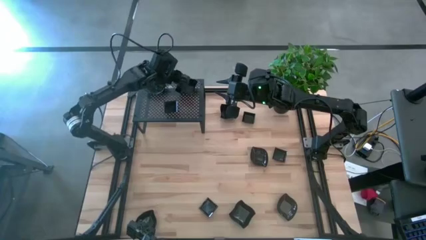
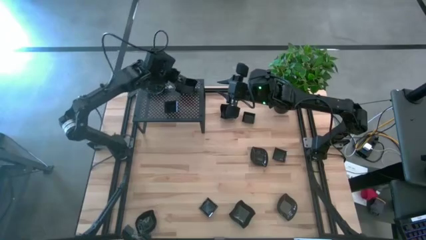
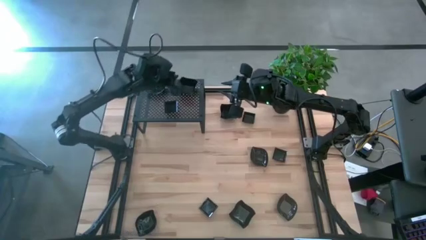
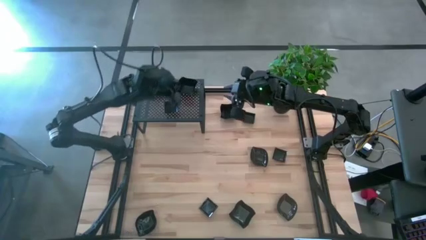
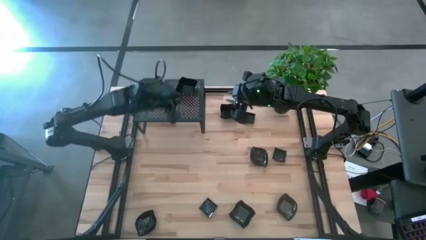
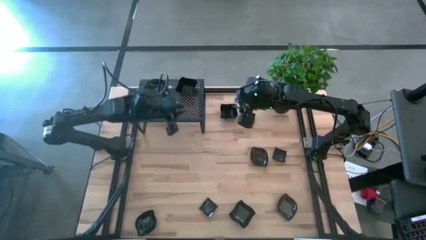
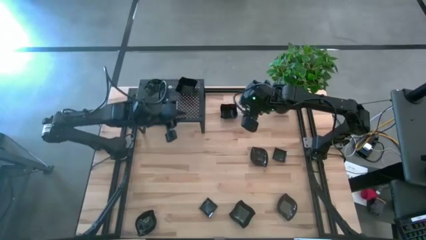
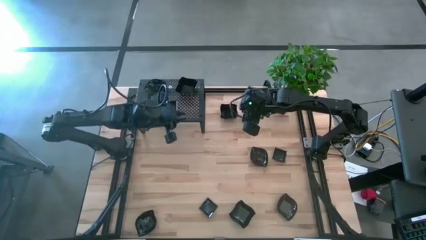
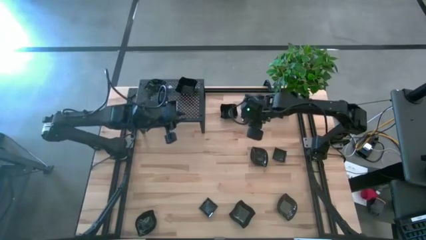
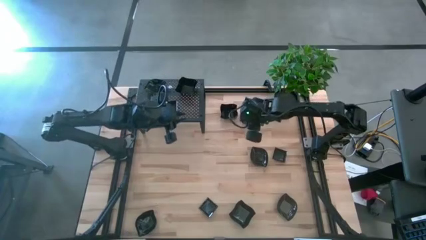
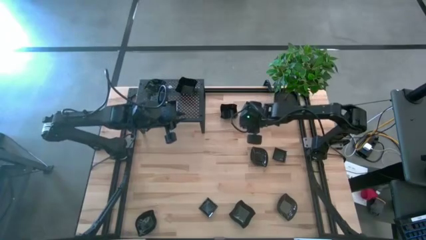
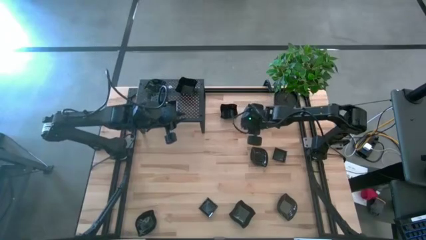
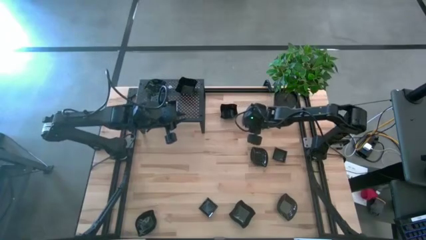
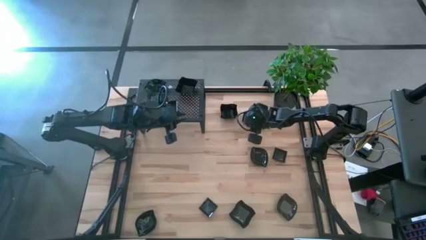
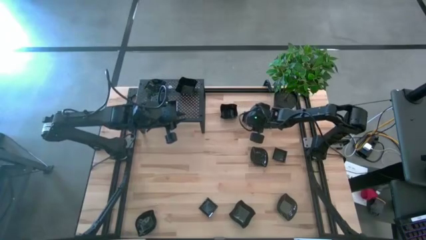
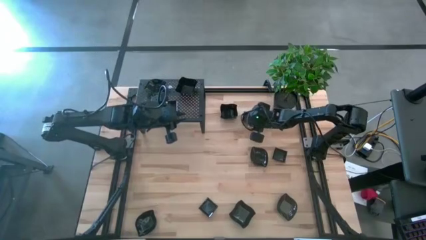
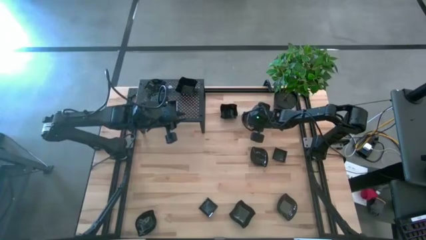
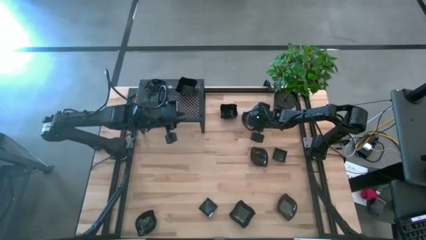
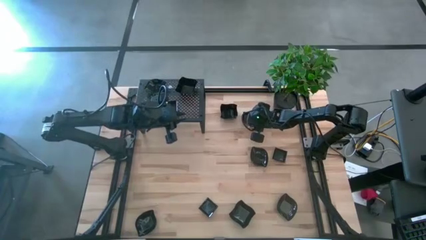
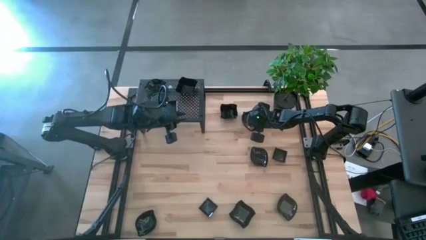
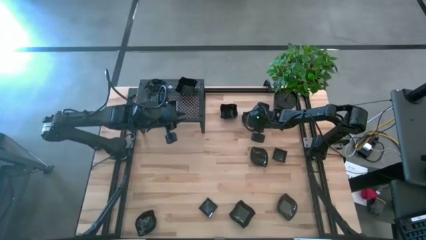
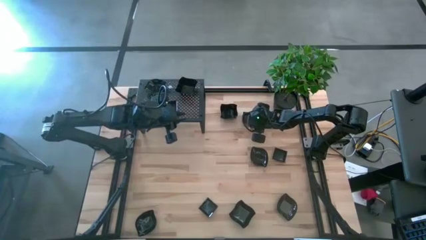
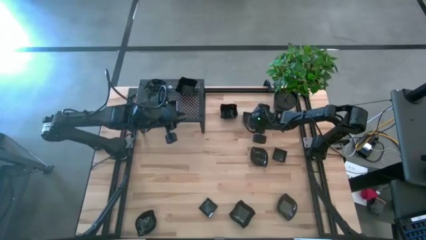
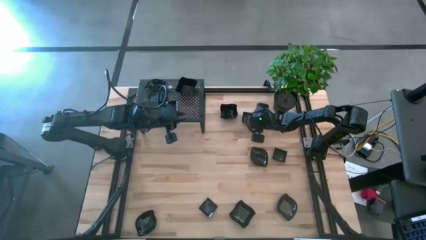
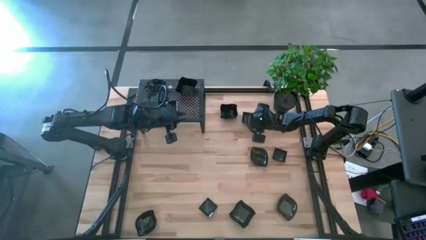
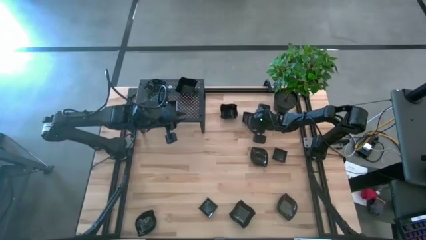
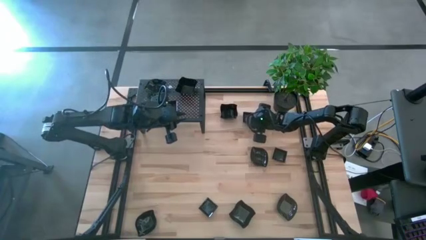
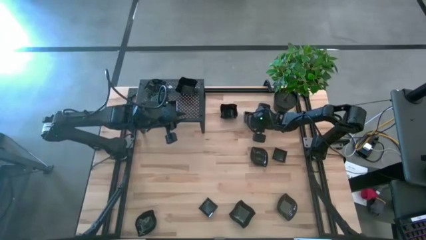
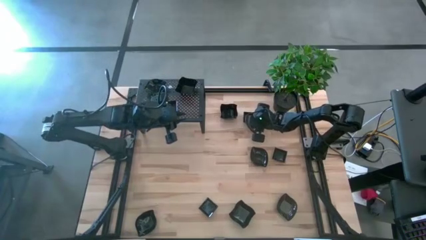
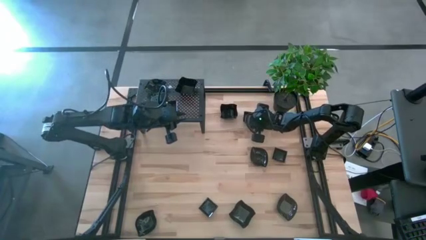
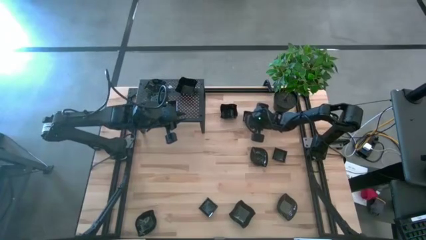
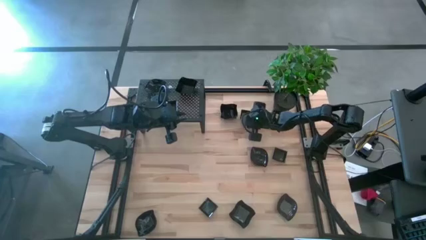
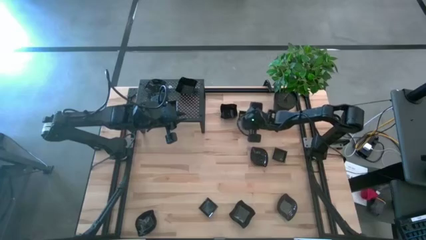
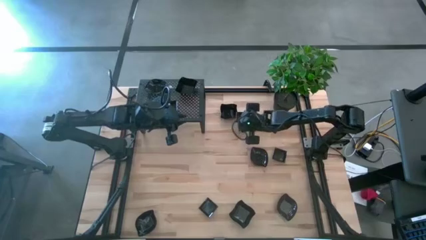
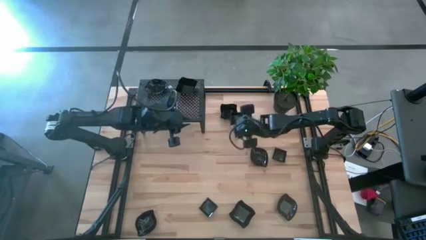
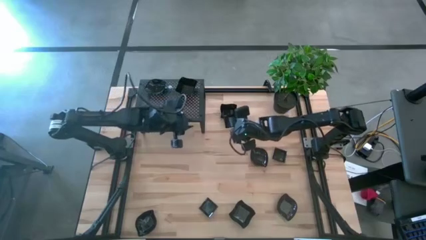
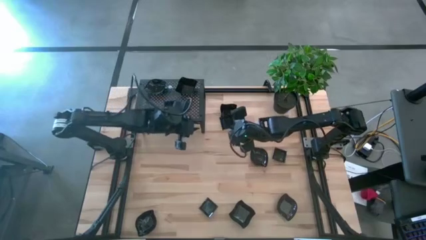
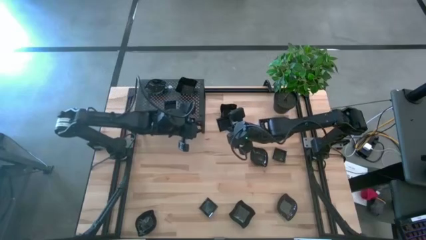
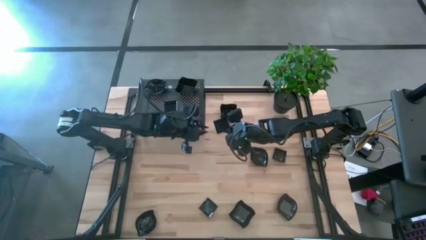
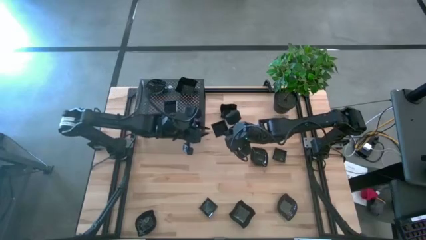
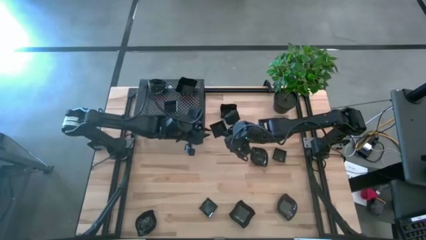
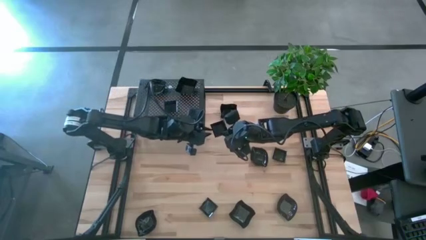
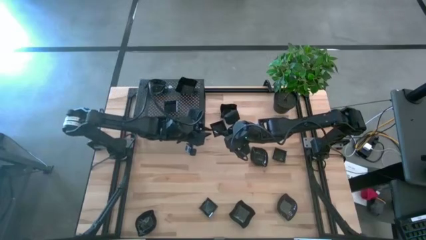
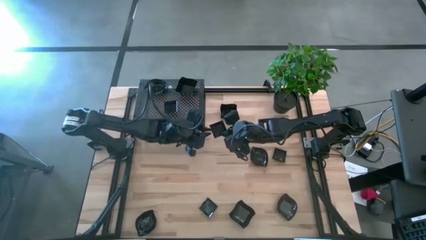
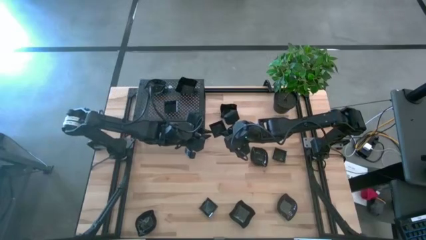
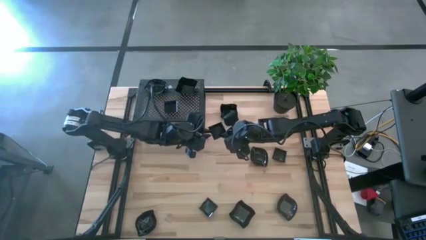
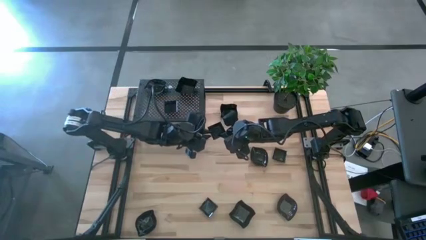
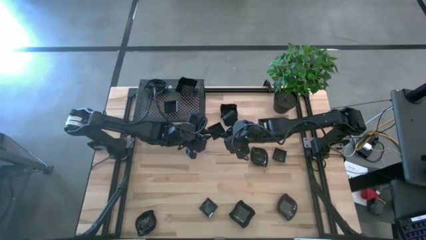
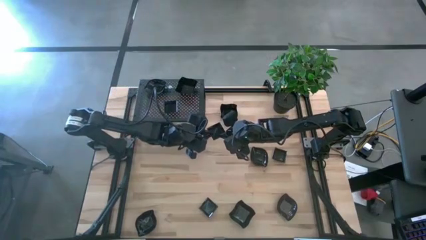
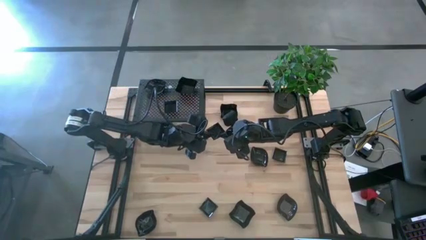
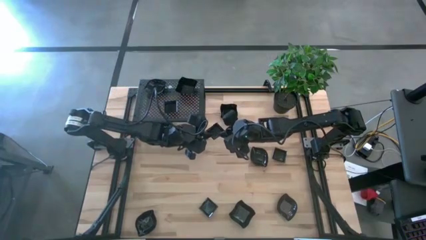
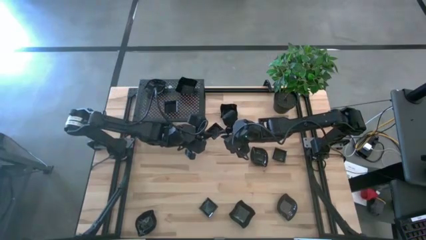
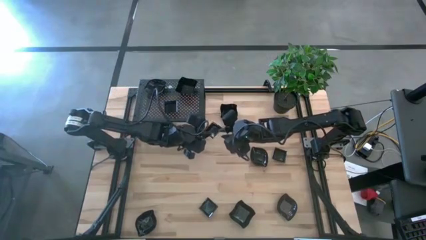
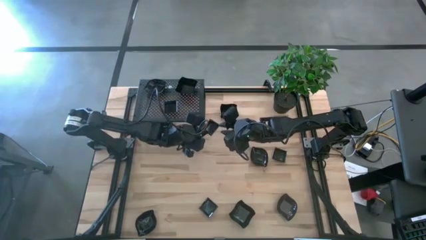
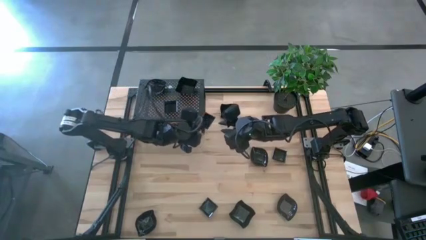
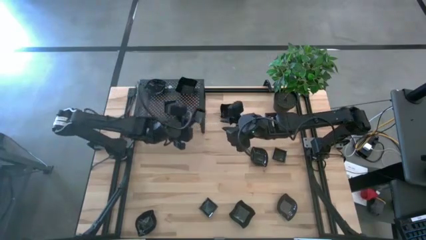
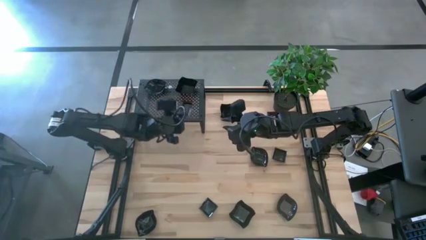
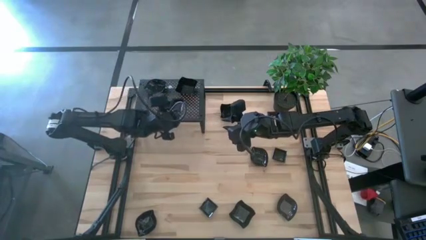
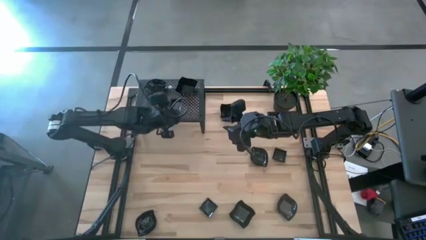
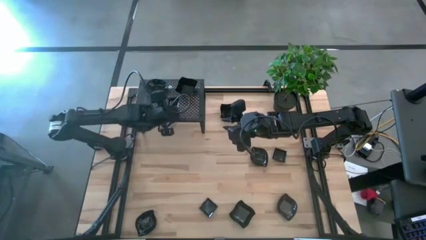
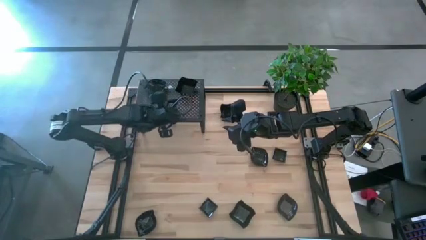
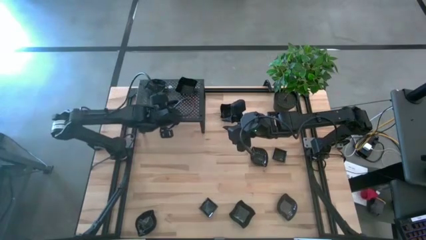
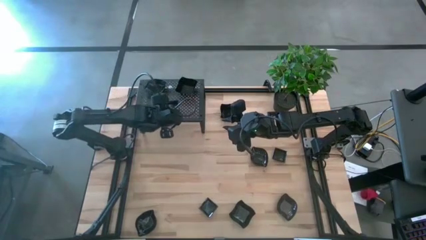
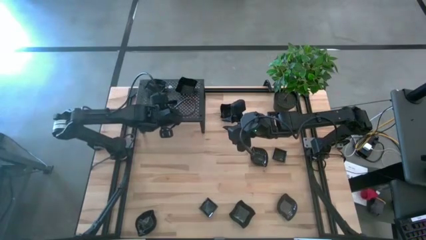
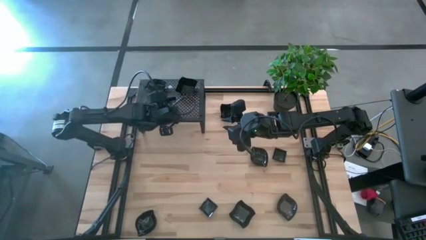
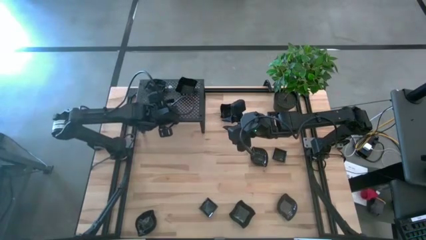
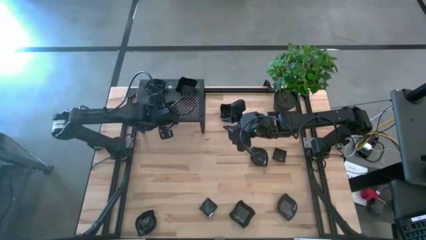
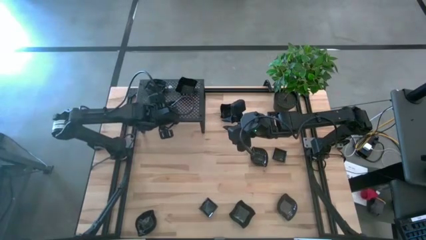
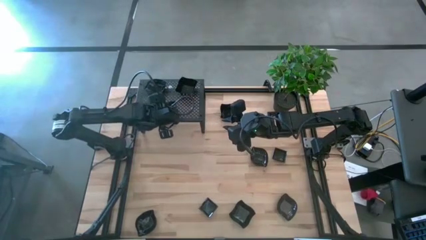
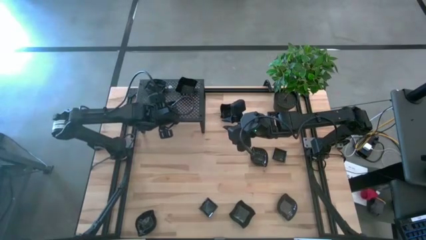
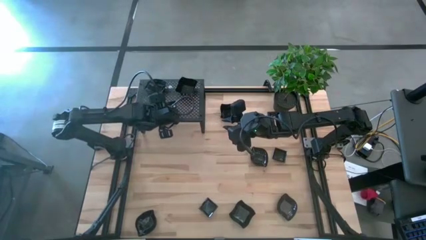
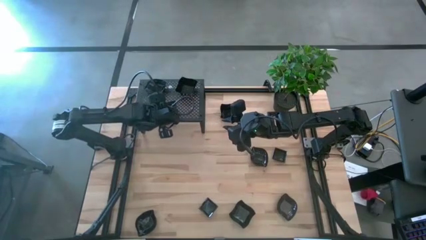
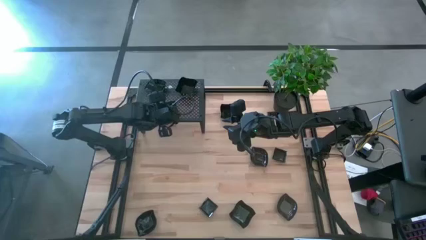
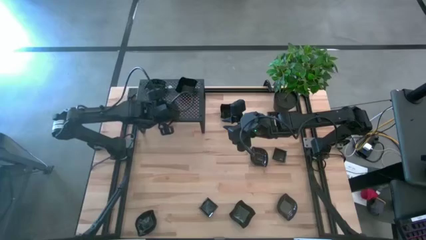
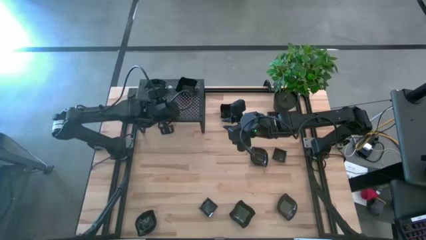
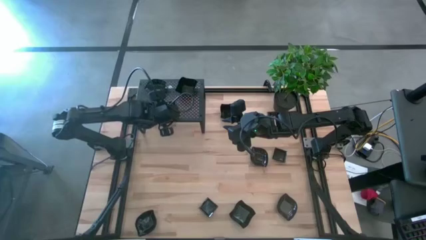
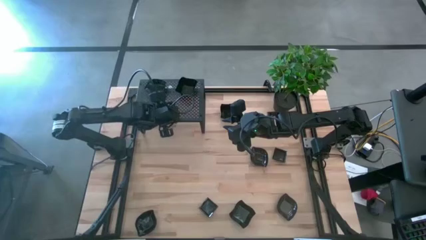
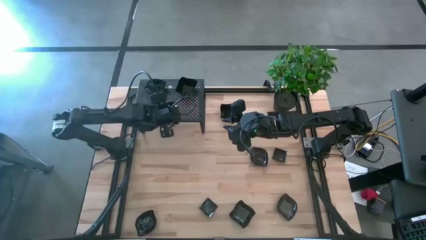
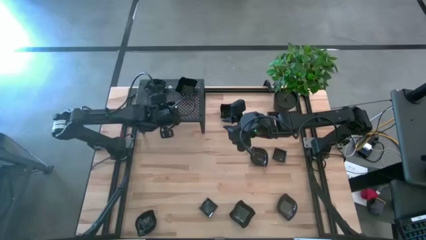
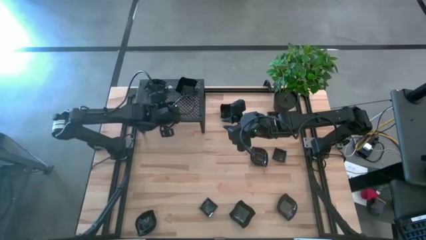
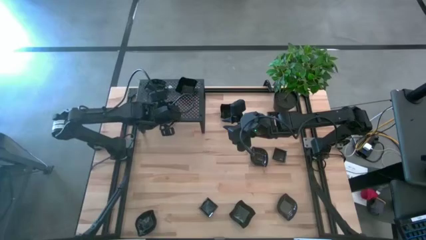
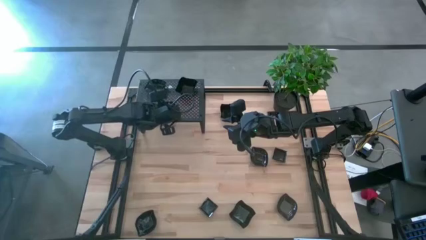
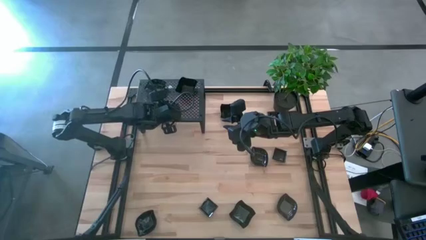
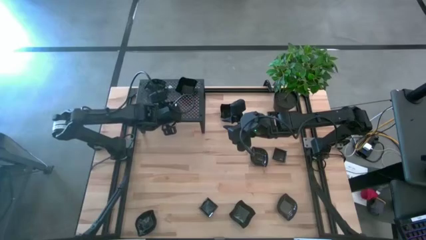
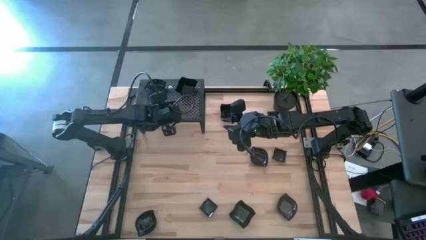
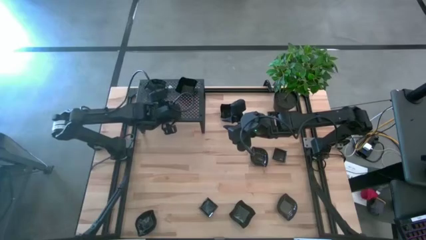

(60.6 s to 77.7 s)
Task: Pick & Place Mini shaped plates
Stack the square plate on top of the square plate on the shelf
